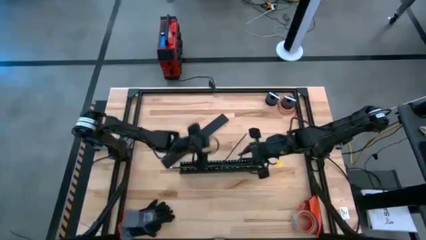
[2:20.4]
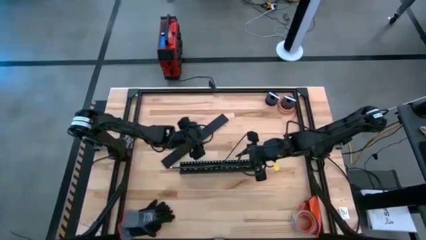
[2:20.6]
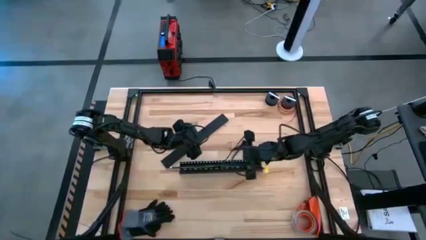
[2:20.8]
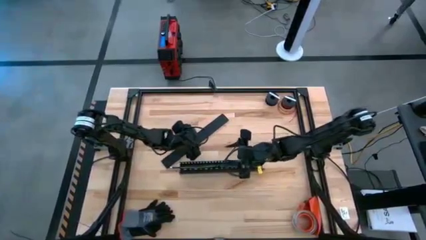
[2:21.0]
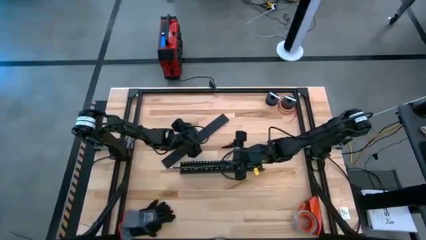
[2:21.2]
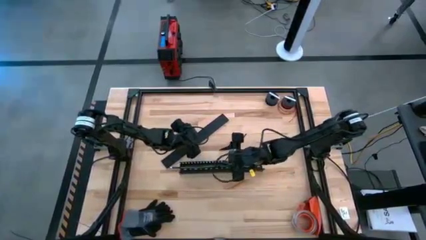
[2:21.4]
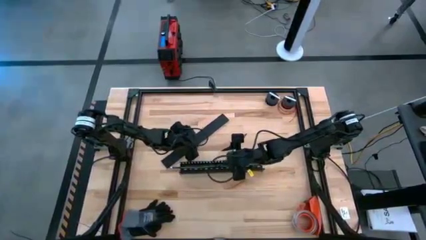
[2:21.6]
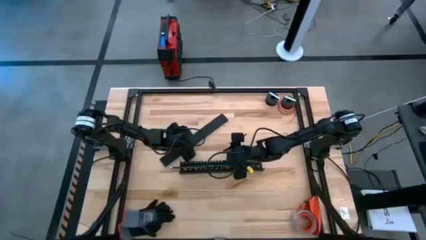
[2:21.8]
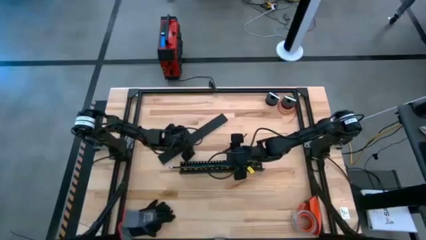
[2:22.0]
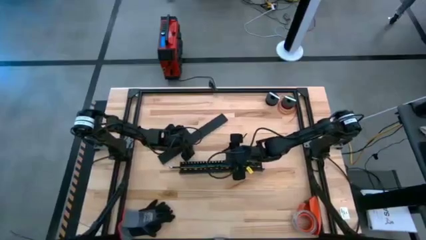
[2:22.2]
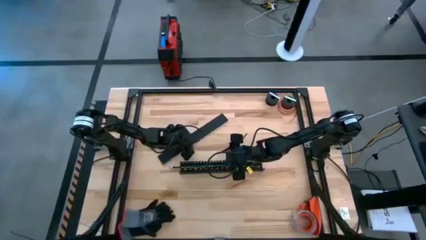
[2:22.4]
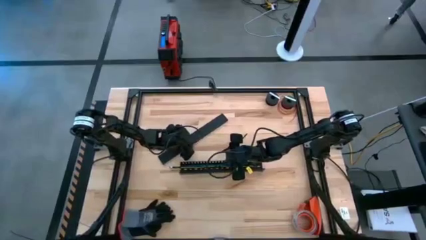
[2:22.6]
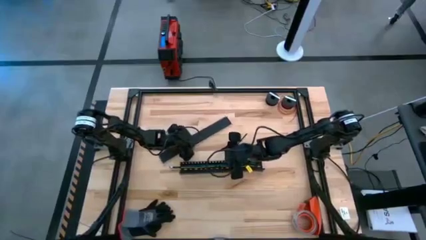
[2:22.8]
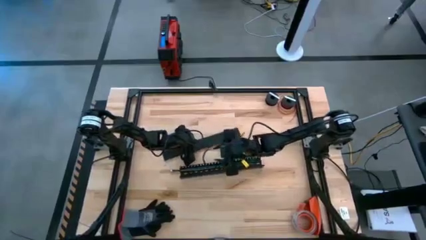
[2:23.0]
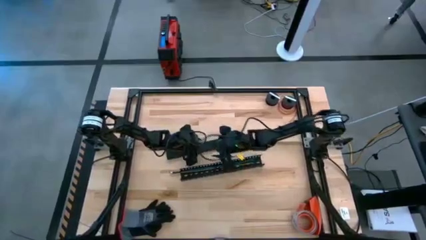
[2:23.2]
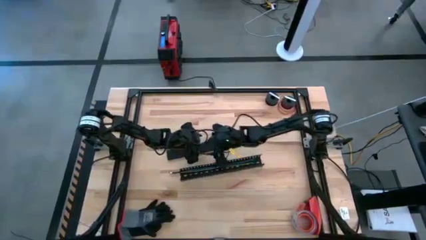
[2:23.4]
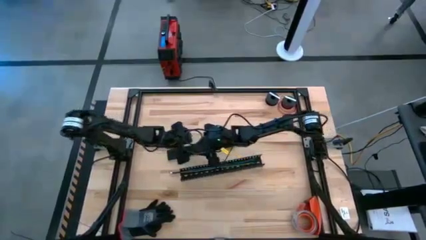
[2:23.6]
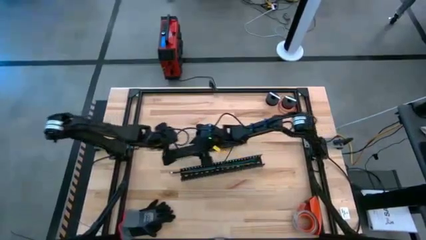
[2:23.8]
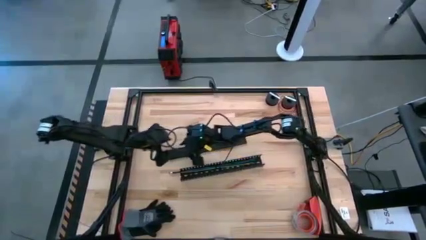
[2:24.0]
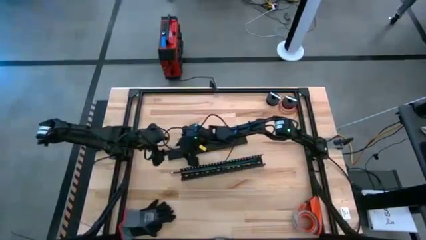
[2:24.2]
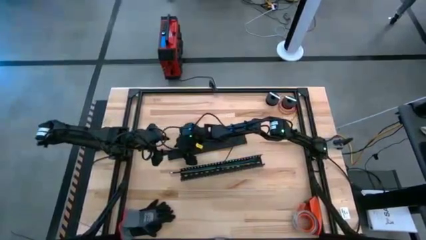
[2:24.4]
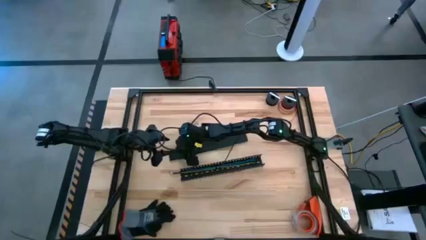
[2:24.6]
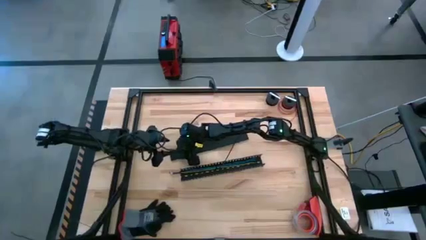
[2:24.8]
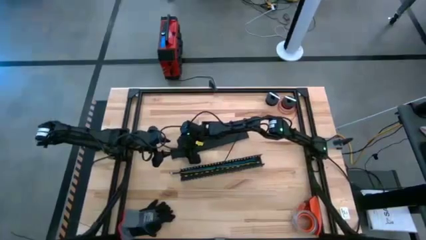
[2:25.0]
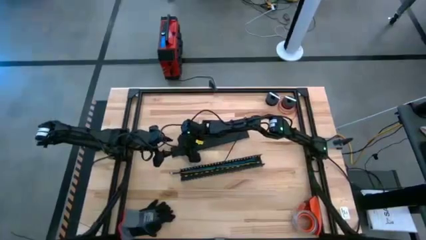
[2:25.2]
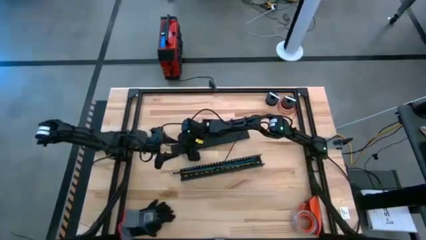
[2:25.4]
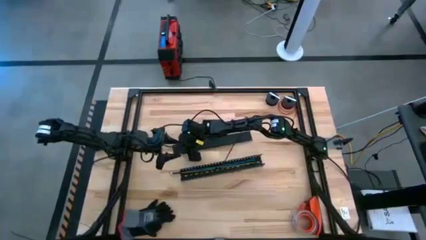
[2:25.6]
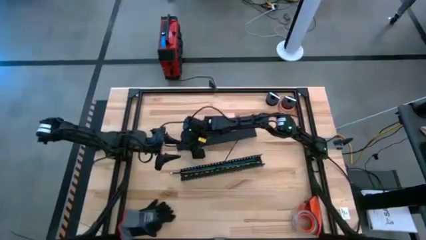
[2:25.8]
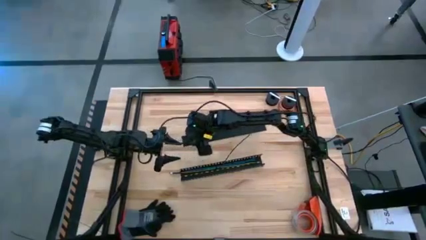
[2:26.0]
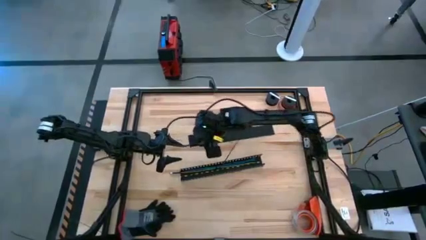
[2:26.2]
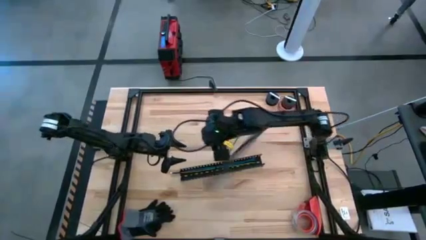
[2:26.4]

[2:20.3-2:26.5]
Task: Ziptie cables
Insert the cable duct cover into the cable duct

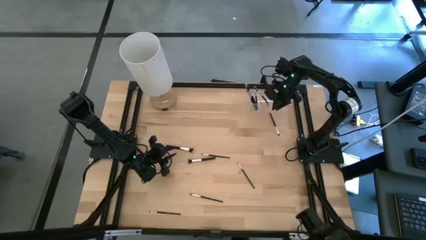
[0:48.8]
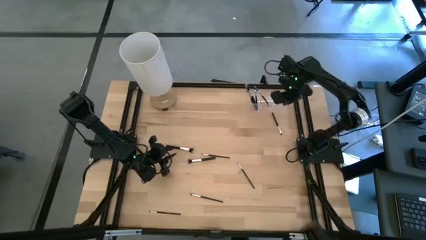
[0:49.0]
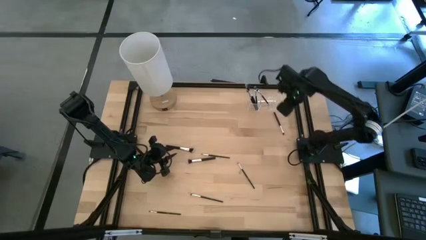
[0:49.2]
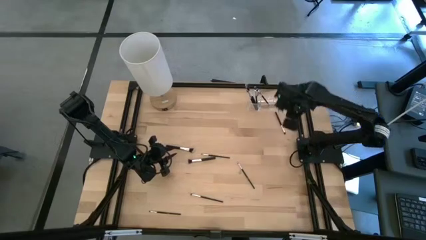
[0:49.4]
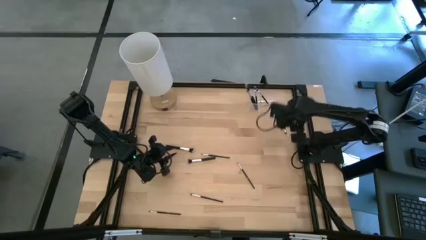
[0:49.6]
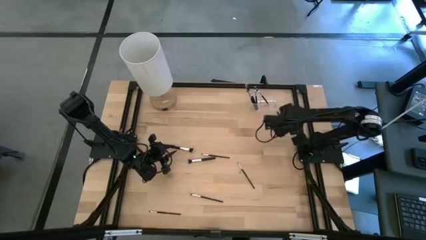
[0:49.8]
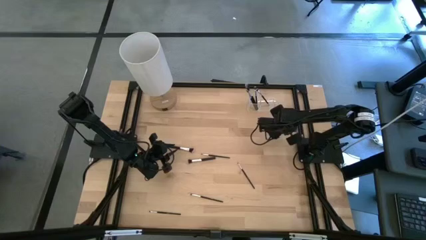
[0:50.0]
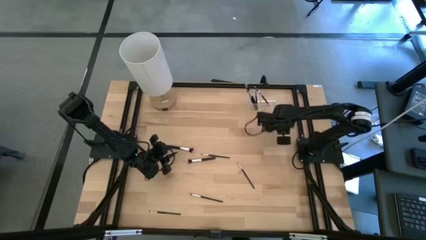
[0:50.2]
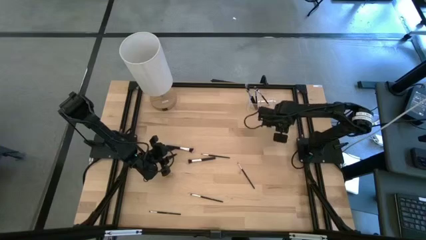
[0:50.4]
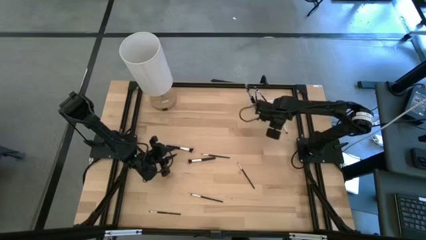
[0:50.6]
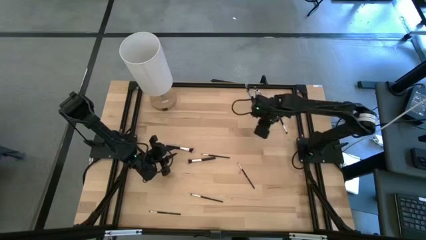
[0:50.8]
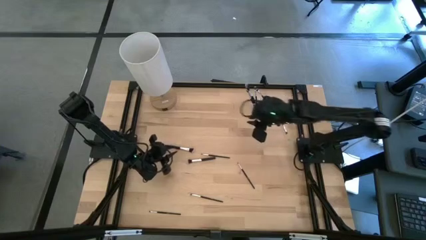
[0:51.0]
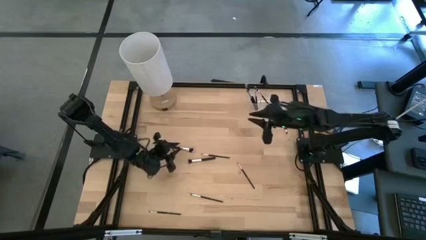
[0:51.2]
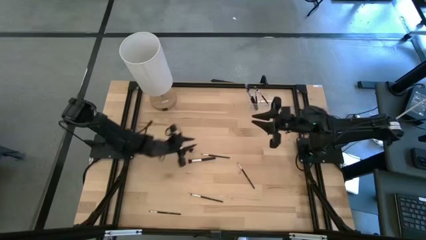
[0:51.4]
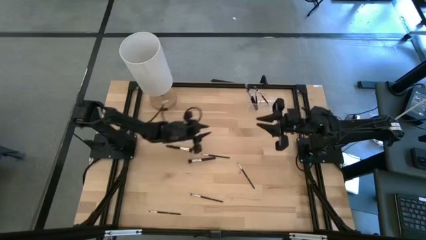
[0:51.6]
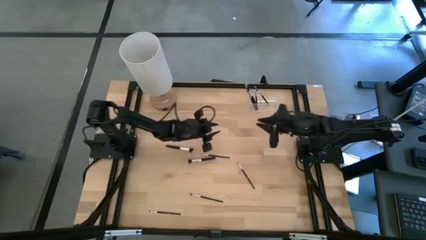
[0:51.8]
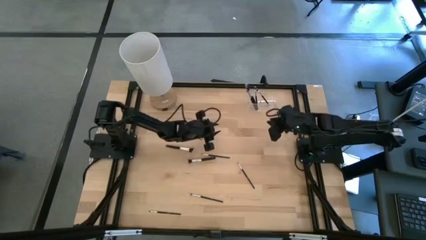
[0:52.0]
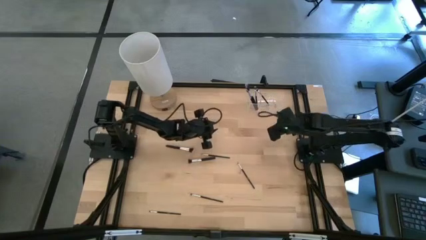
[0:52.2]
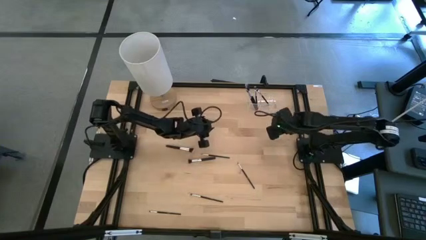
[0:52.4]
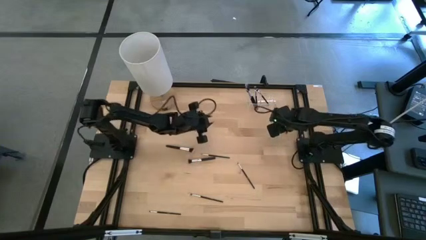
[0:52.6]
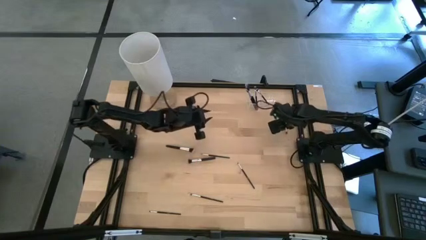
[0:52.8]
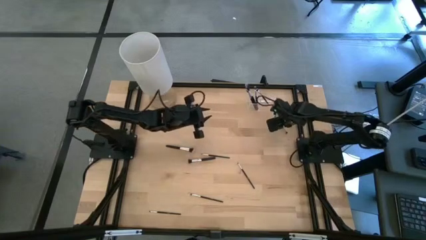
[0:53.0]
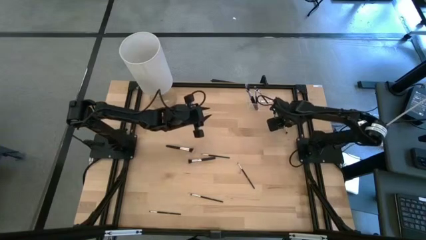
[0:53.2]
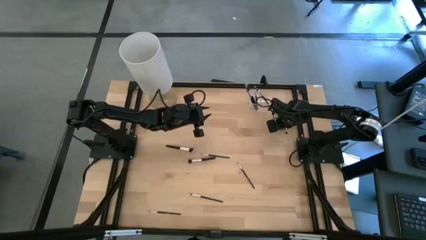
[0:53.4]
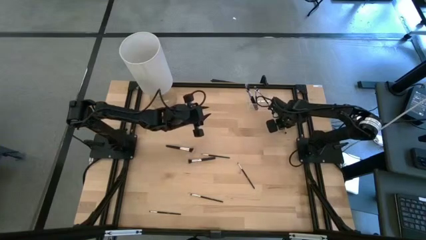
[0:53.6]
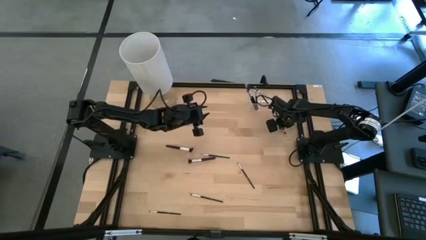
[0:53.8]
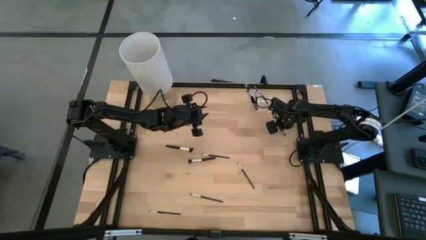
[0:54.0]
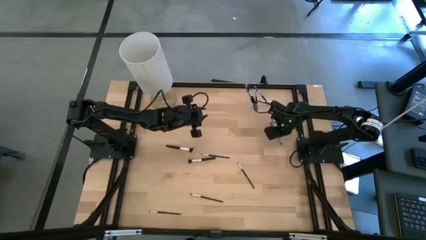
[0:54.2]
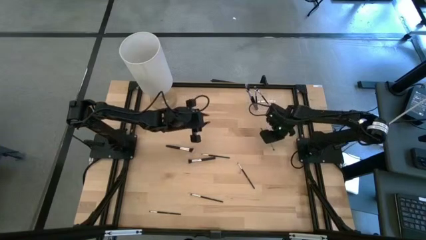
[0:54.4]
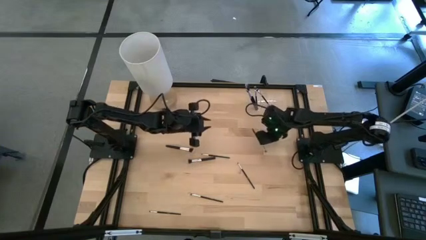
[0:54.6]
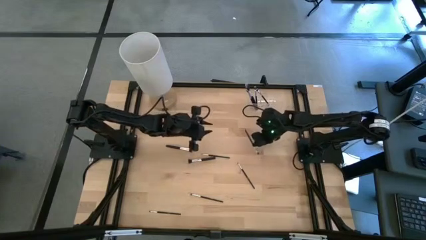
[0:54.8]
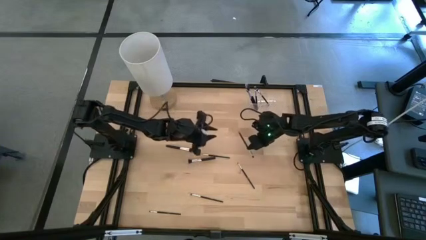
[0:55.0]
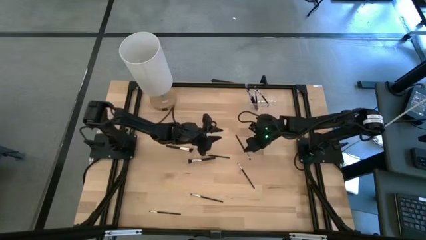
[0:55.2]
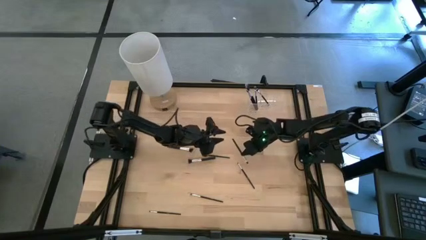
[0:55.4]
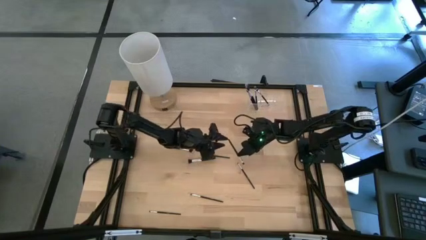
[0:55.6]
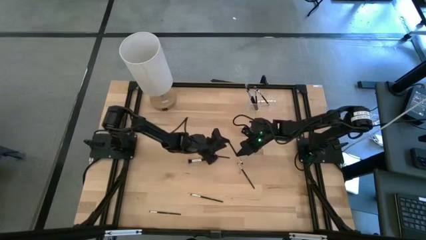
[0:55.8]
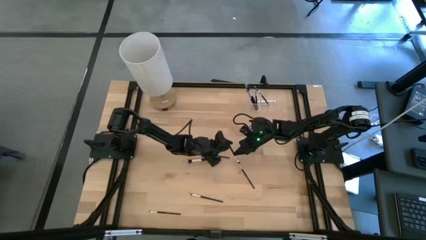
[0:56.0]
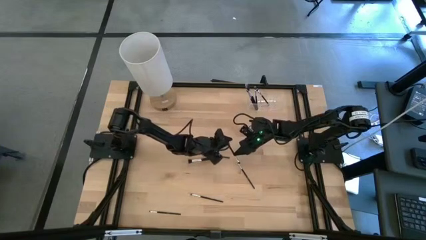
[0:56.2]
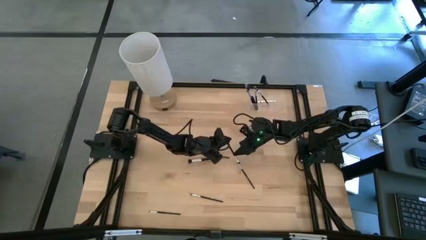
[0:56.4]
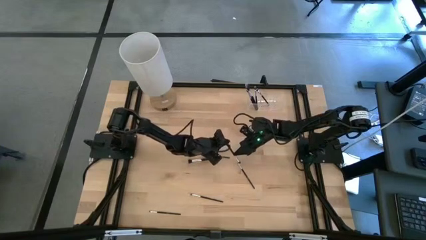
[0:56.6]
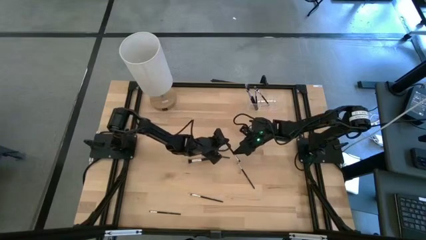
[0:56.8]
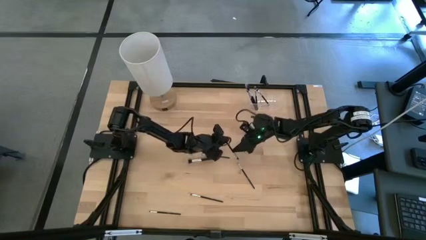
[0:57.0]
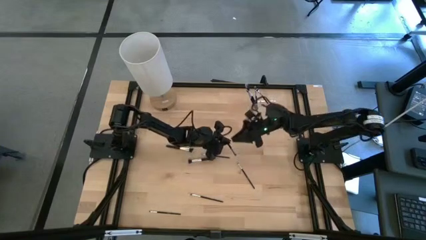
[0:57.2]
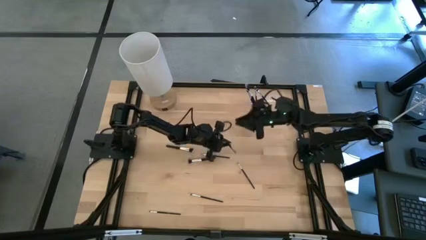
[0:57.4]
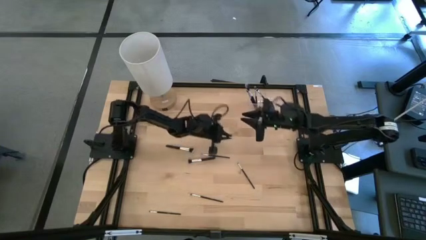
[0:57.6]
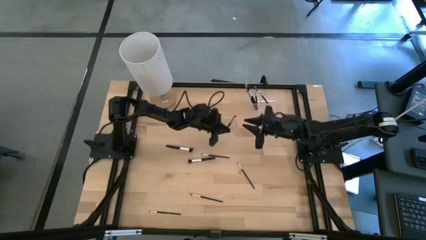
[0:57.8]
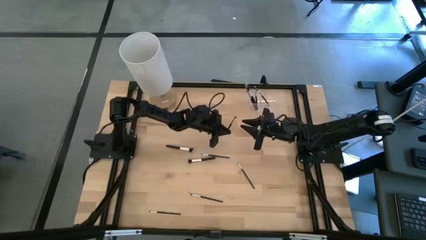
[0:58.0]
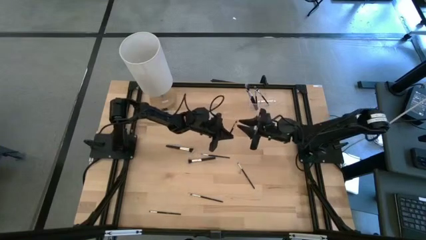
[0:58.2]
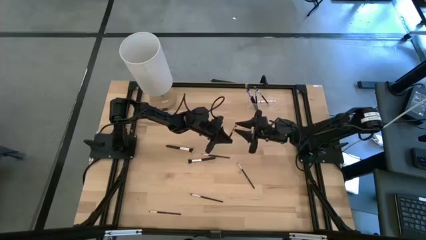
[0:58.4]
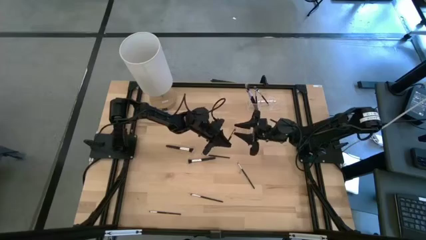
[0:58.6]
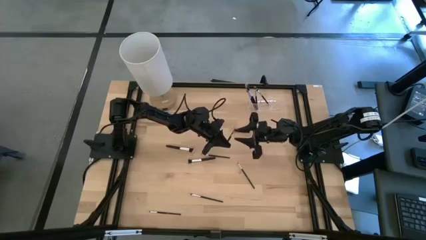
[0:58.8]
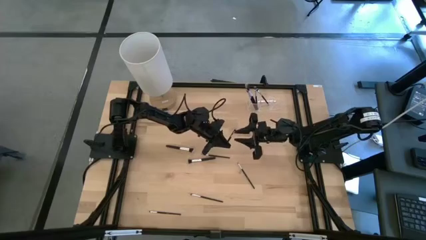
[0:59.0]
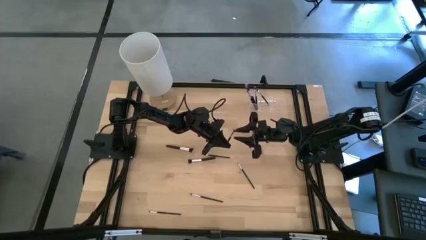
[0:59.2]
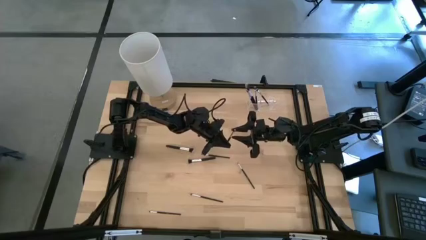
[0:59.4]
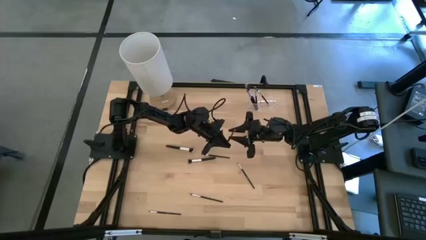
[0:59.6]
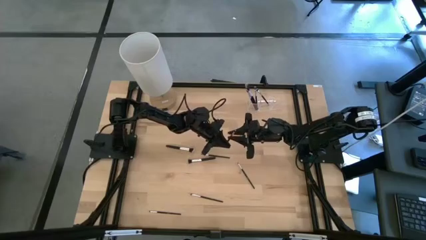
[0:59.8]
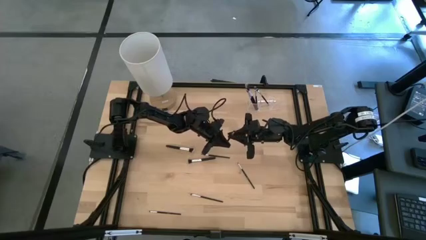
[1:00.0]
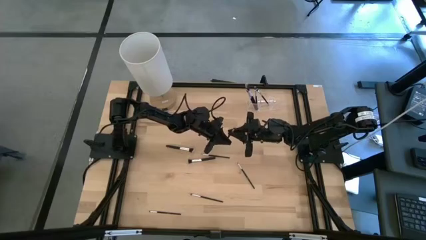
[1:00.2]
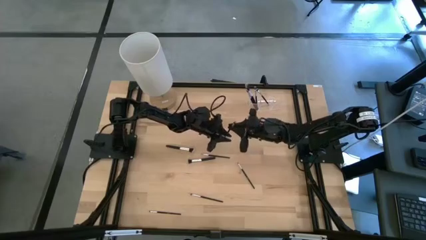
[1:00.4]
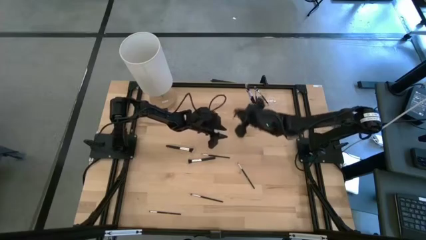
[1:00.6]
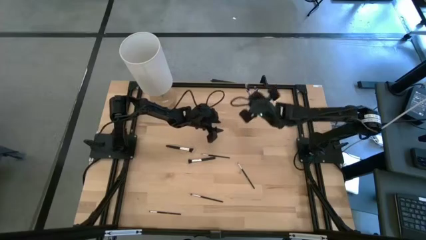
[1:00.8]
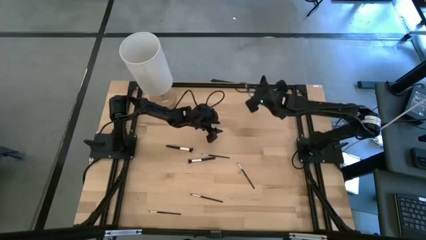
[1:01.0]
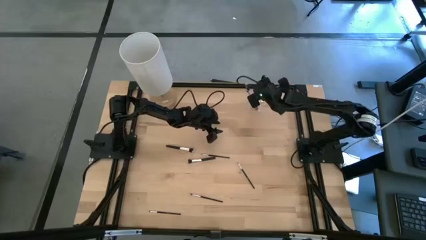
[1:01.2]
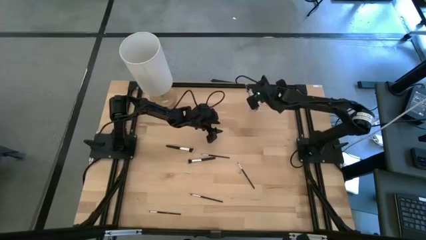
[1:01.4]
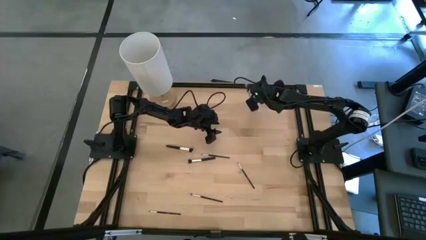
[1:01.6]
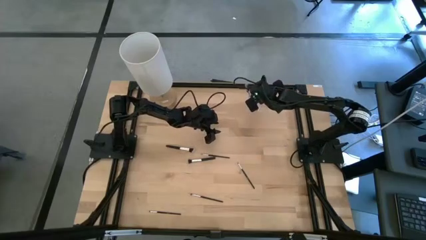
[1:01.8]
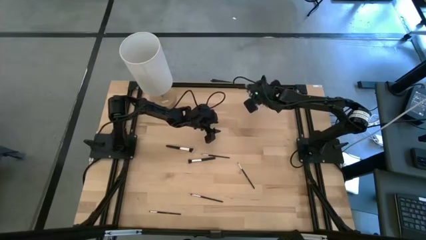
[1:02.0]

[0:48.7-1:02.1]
Task: Put items in baskets/containers
Put the eyeshadow brush into the middle of the transparent organizer
